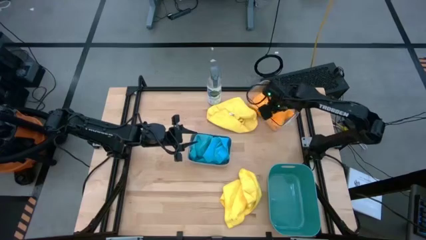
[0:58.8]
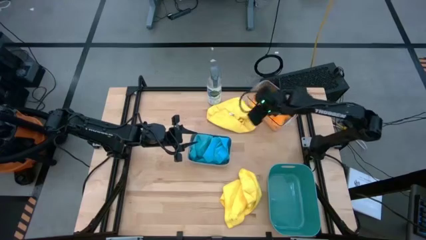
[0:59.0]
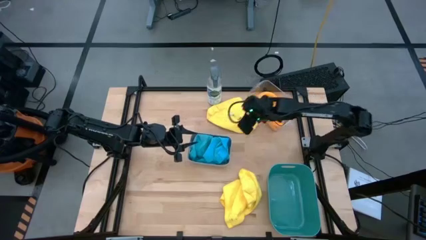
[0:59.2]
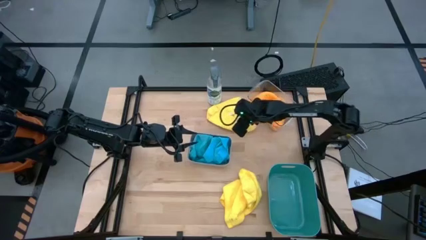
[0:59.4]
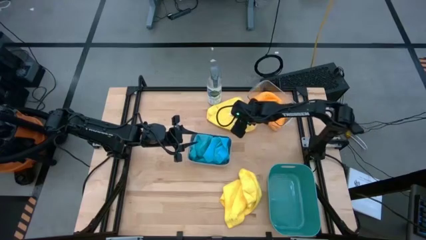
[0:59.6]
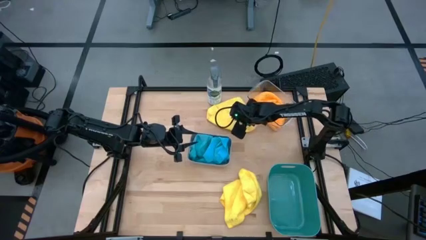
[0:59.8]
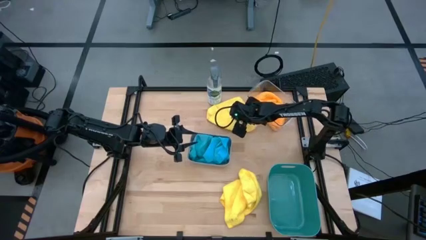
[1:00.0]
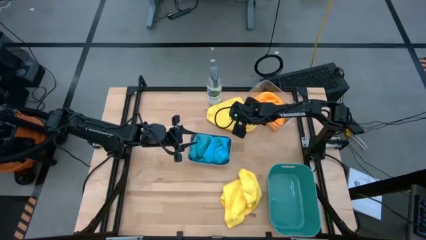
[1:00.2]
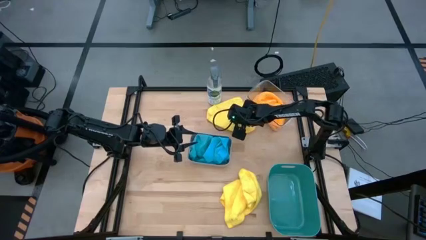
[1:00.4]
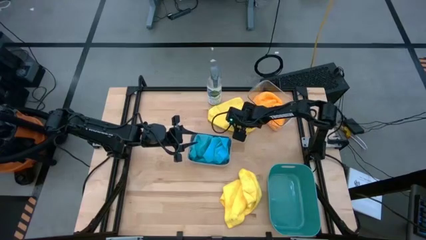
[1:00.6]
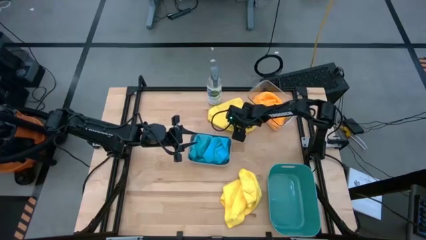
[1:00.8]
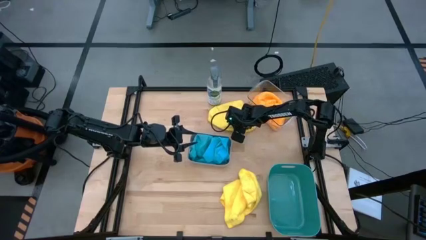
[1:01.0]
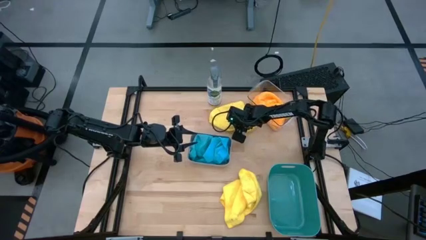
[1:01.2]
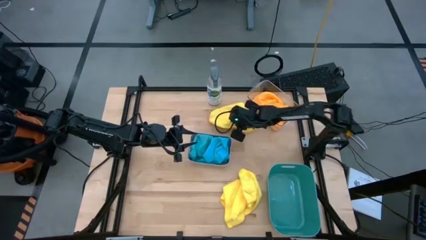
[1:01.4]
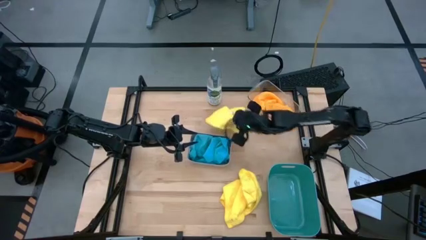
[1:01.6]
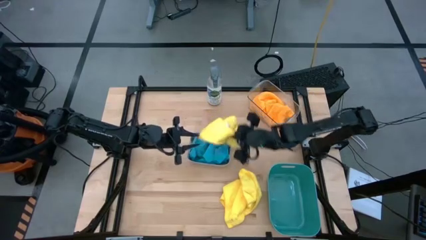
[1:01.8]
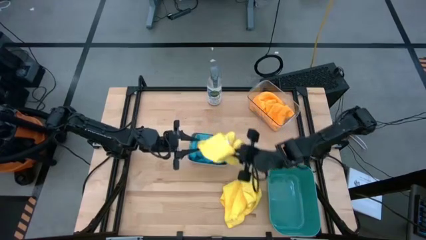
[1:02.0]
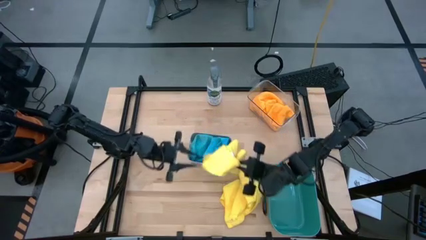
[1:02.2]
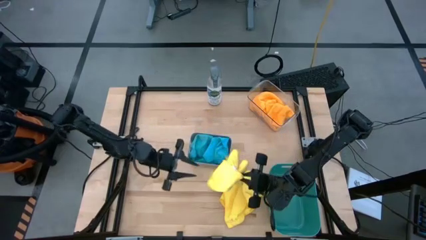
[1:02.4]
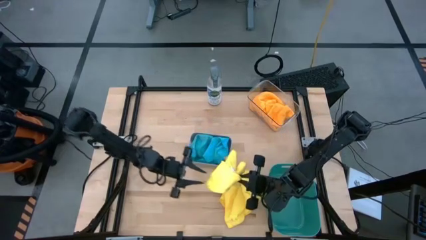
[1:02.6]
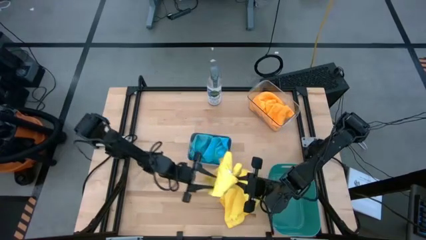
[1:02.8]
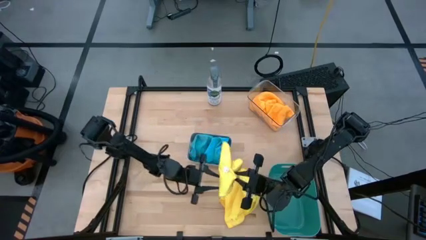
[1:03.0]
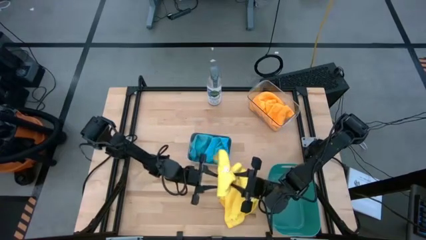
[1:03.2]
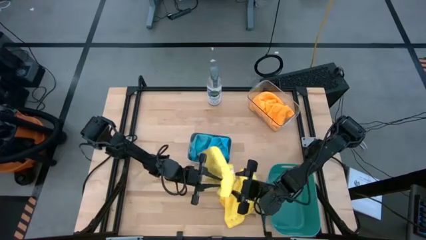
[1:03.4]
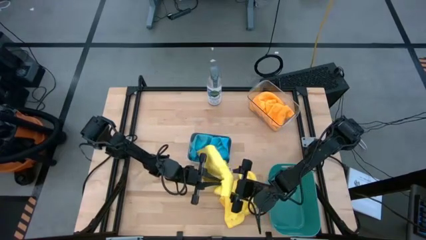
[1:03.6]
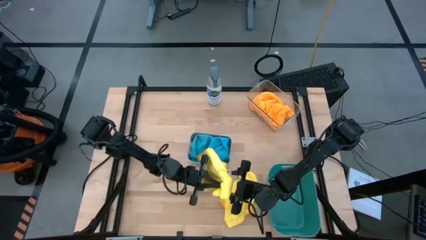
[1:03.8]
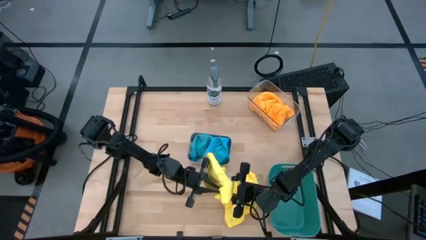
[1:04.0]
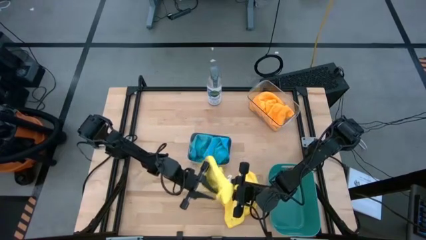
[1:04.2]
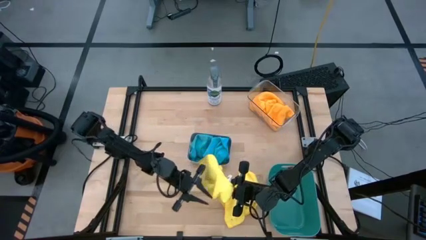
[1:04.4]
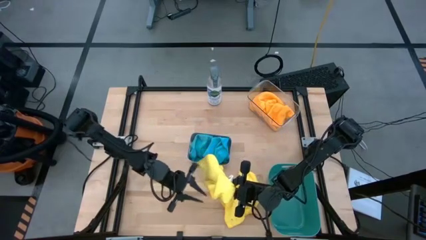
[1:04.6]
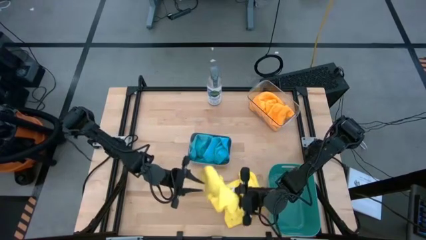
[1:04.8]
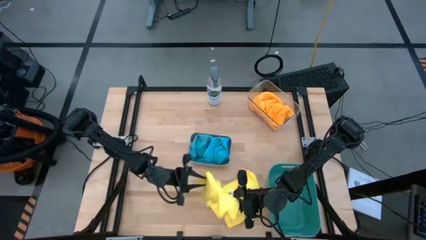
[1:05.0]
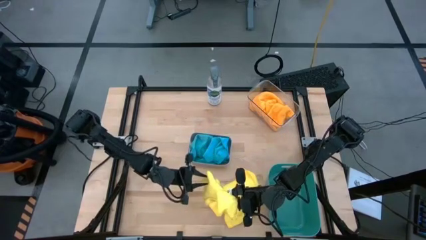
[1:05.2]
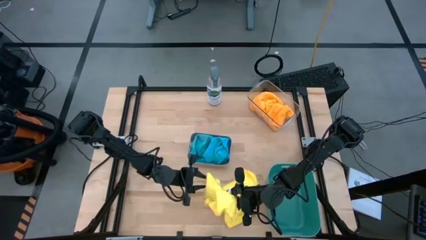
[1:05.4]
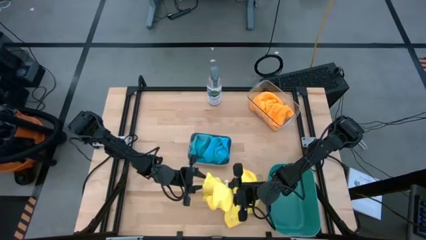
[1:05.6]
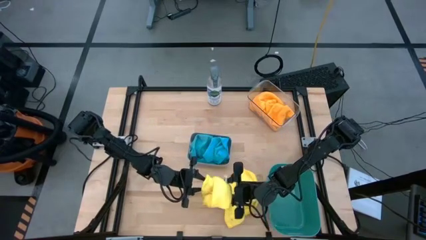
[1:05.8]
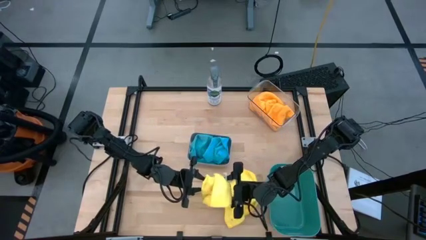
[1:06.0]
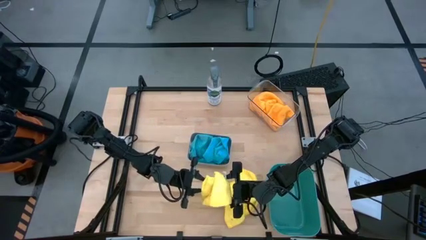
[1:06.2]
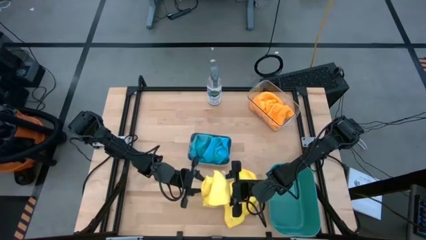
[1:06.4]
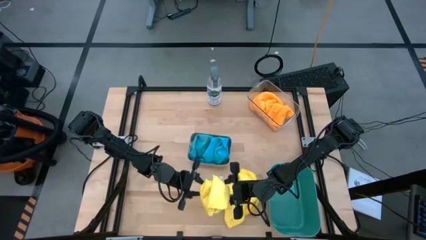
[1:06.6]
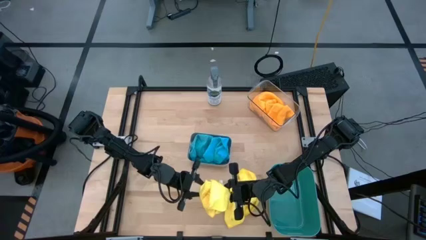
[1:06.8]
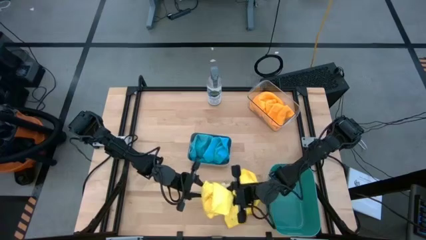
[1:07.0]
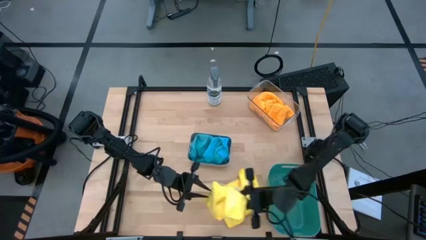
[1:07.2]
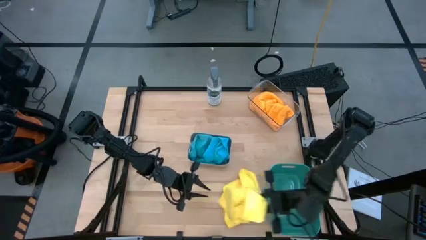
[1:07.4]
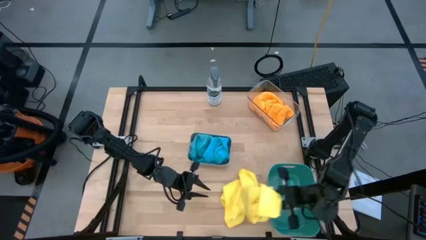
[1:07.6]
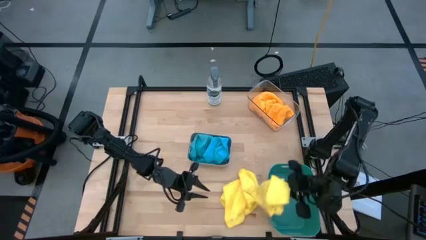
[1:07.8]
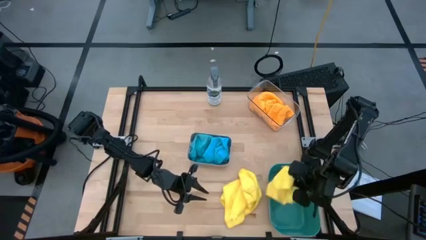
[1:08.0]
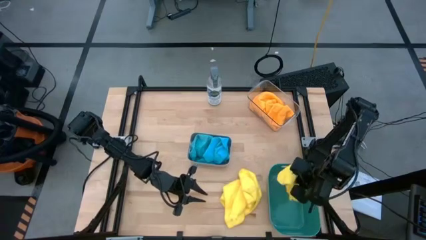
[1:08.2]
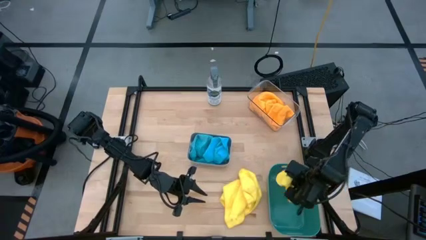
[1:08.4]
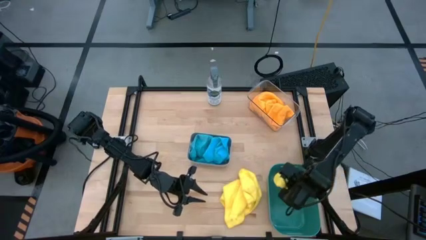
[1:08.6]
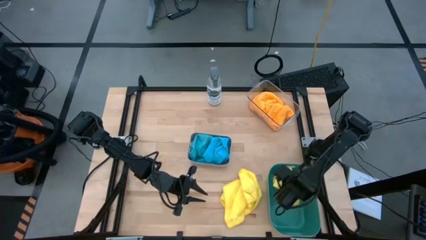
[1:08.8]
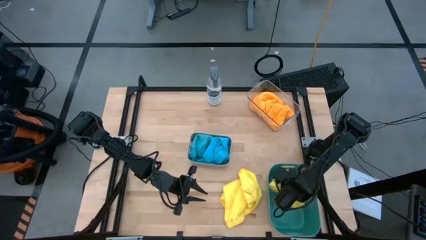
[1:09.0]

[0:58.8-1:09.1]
Task: Sort microfiber towel by color & place in baskets
Put the top yellow towel in the blue container

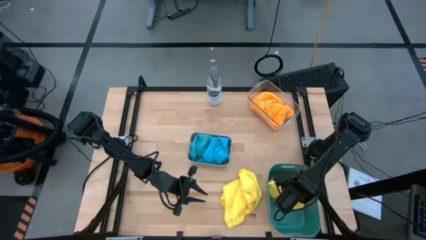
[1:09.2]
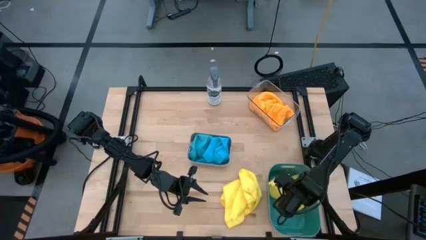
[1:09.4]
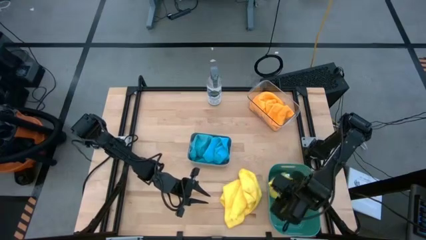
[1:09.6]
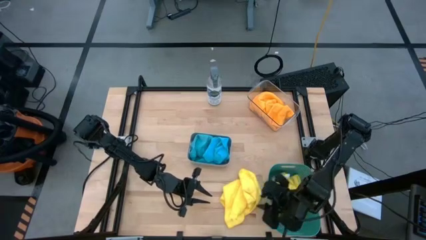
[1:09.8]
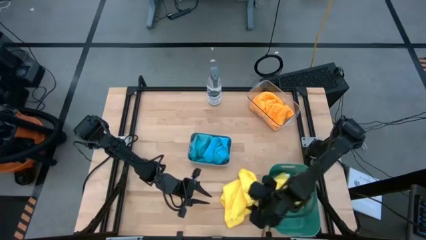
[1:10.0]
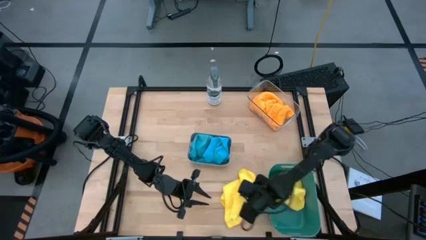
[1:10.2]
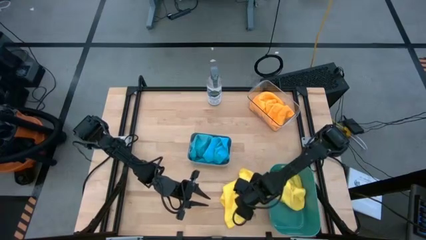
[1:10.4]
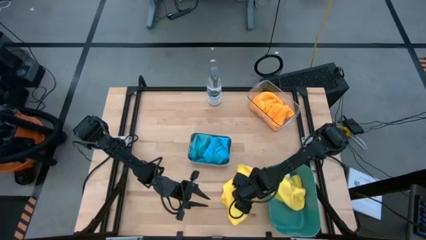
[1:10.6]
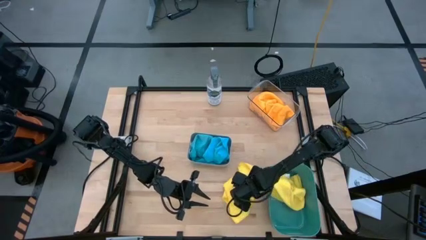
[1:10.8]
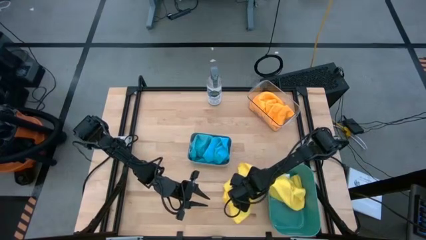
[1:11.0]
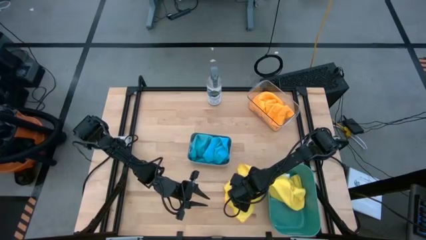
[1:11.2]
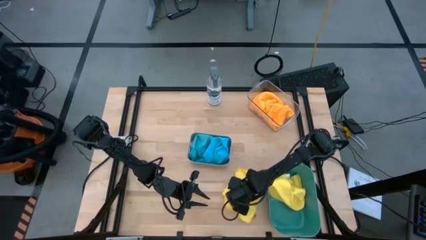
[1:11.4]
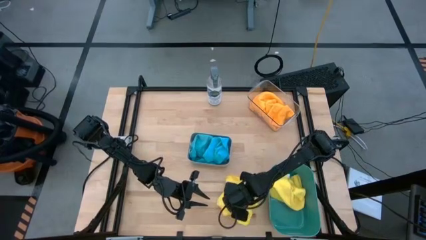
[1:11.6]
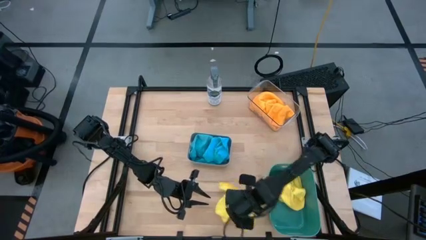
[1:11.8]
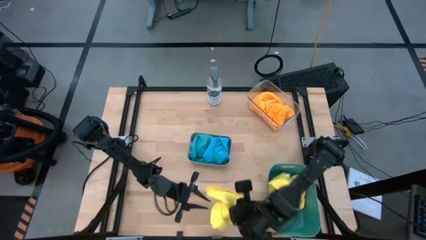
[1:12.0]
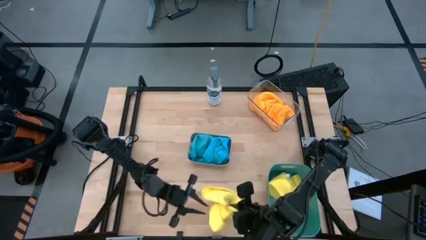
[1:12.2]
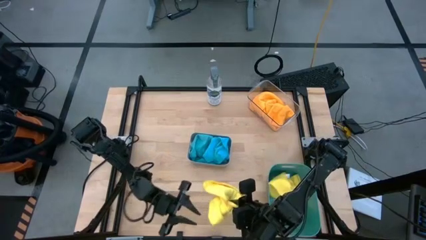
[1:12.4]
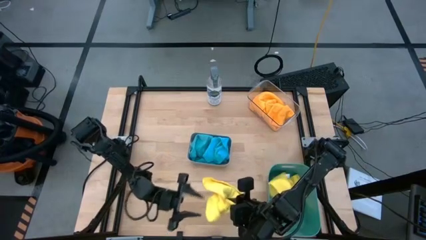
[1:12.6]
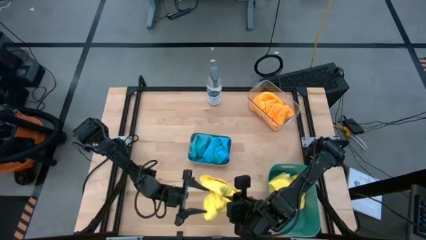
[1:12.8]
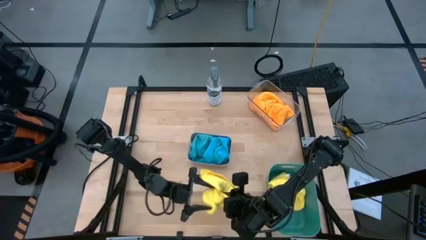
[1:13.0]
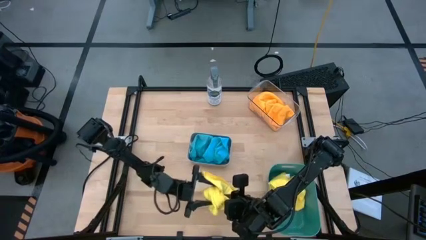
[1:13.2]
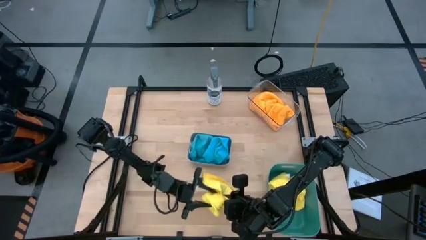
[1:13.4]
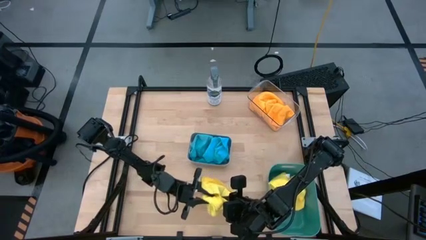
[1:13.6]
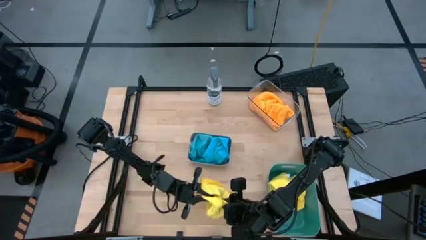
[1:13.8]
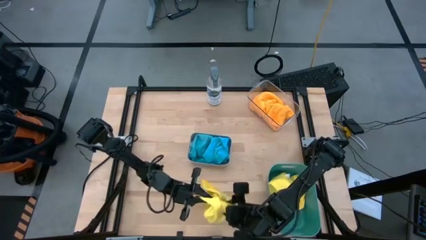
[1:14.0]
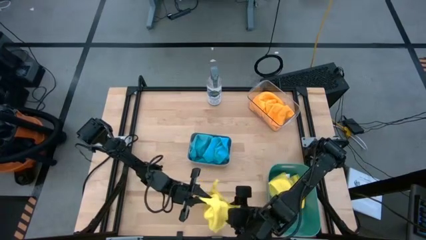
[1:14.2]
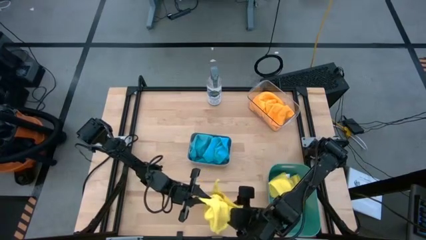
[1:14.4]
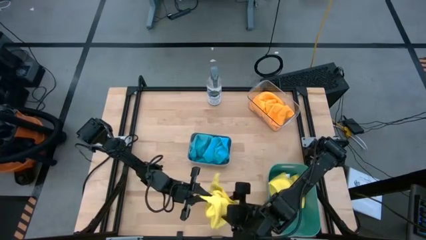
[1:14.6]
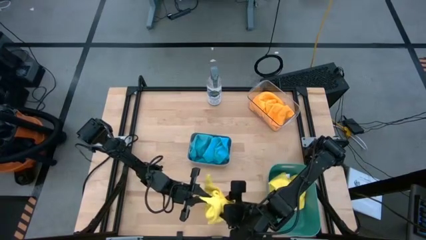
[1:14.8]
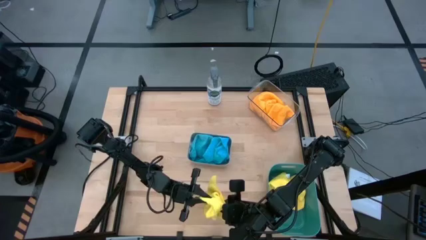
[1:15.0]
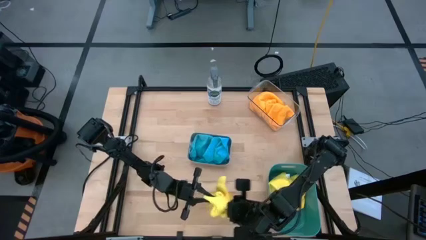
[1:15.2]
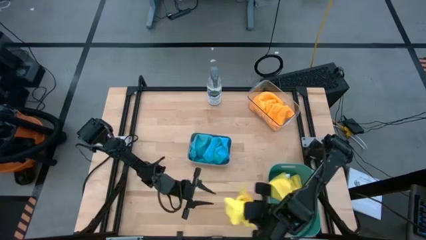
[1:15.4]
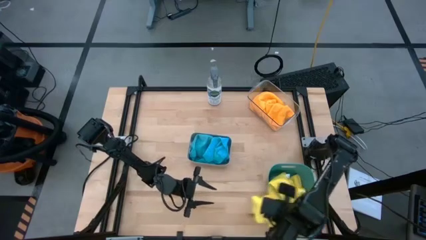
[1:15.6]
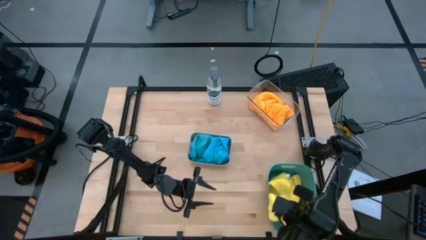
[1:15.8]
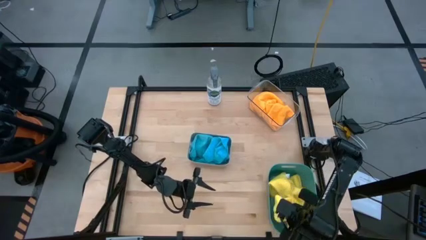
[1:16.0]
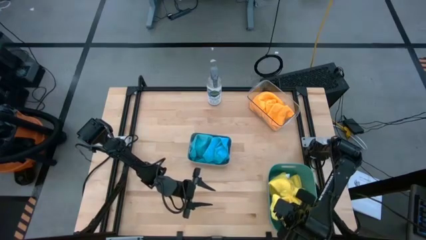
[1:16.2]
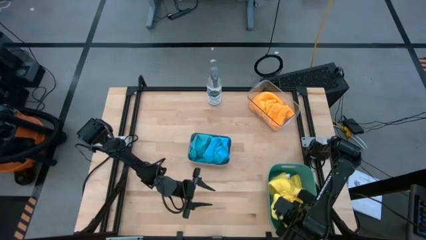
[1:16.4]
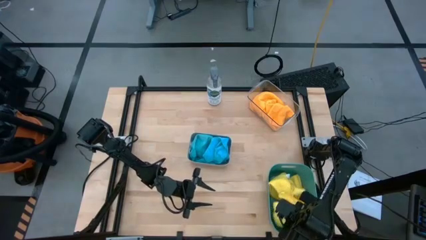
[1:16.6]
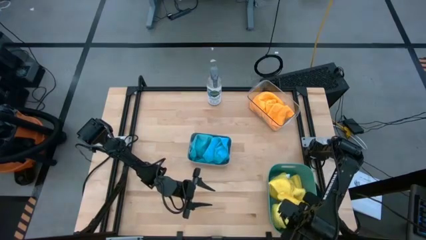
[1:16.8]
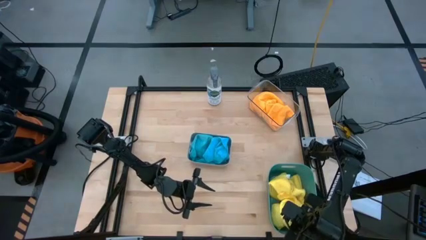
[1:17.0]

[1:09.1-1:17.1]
Put the yellow towel in the blue container
